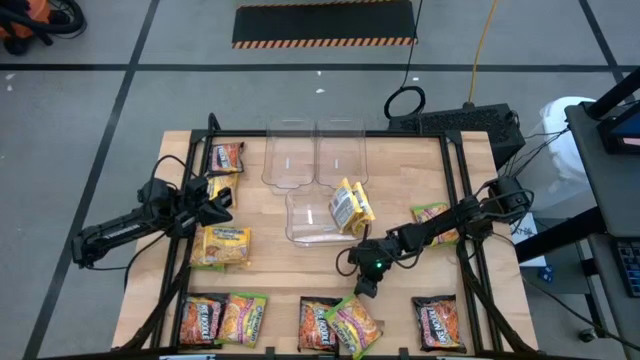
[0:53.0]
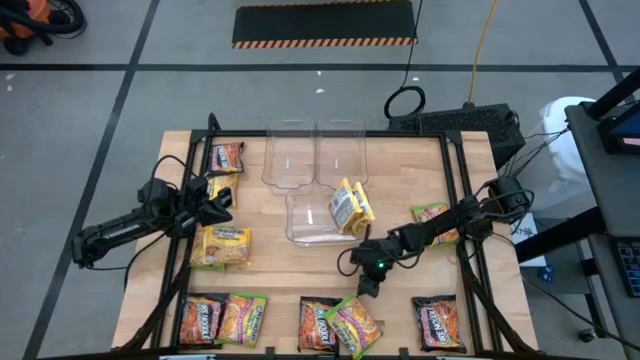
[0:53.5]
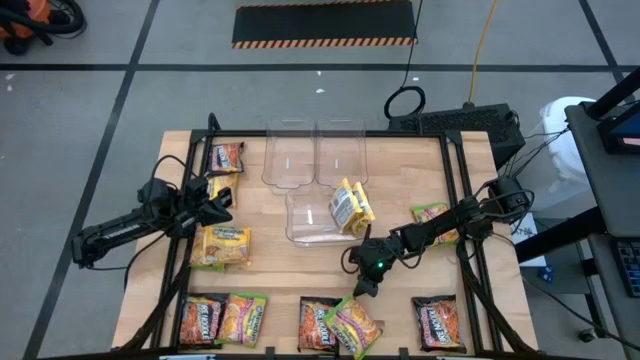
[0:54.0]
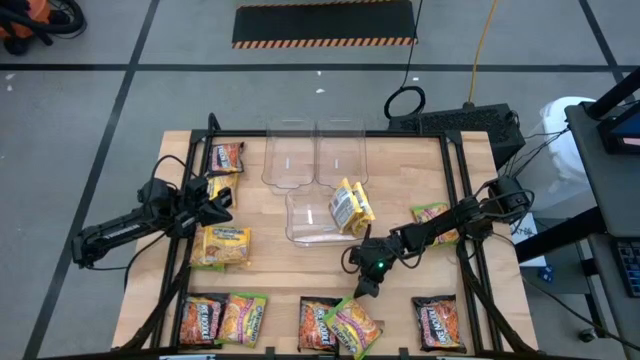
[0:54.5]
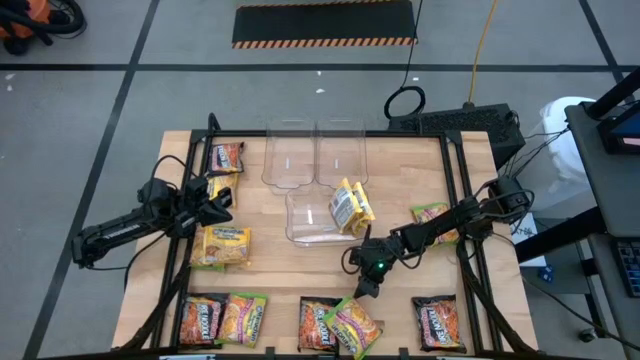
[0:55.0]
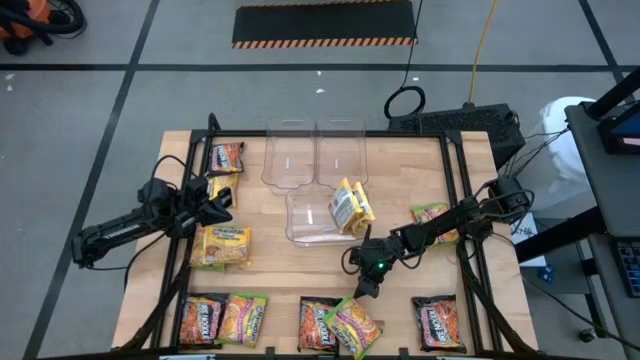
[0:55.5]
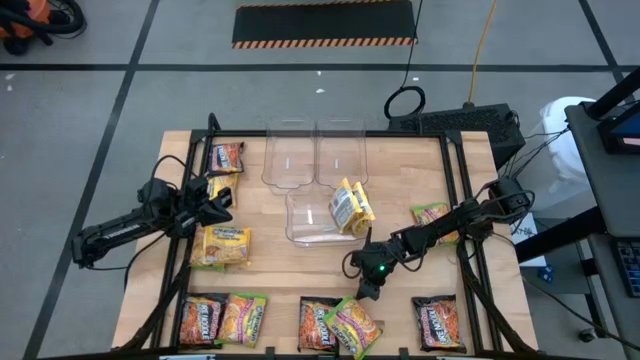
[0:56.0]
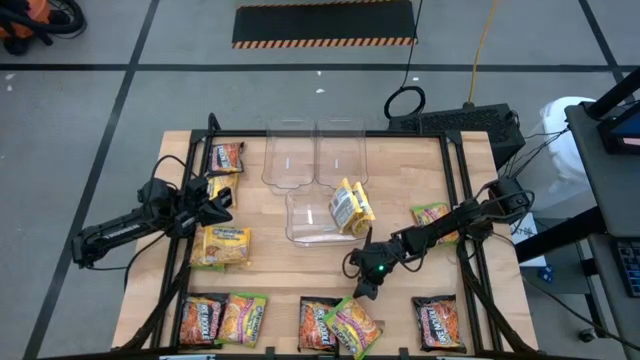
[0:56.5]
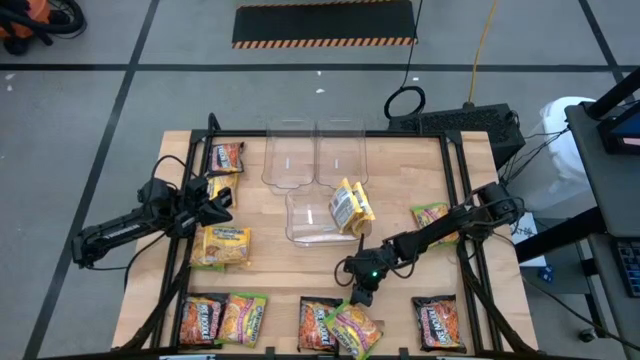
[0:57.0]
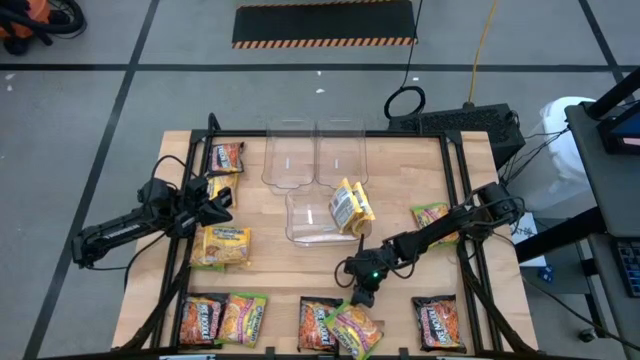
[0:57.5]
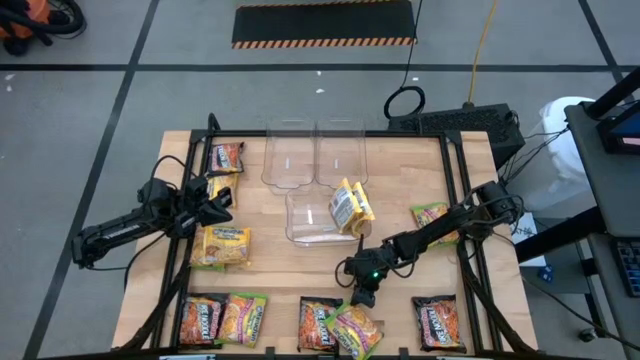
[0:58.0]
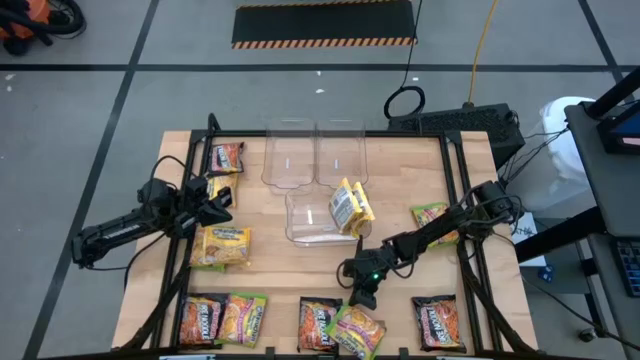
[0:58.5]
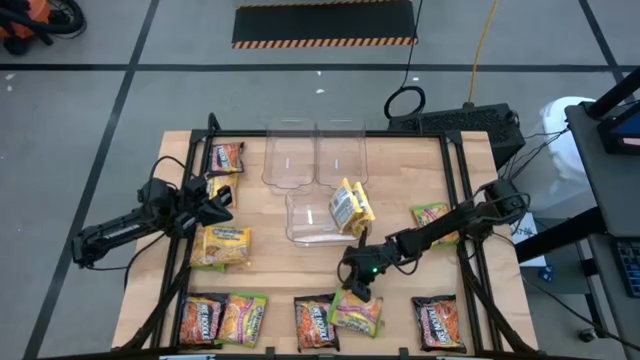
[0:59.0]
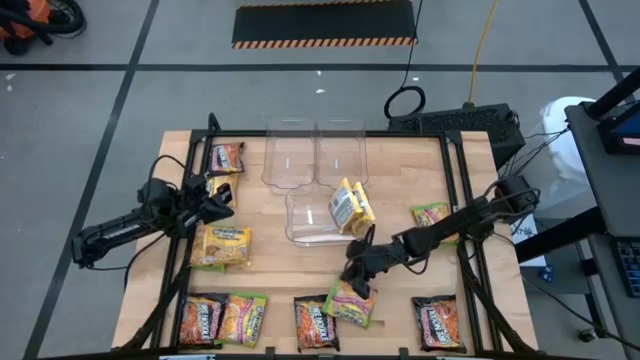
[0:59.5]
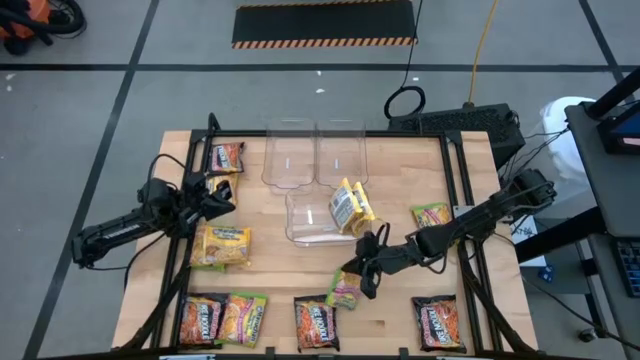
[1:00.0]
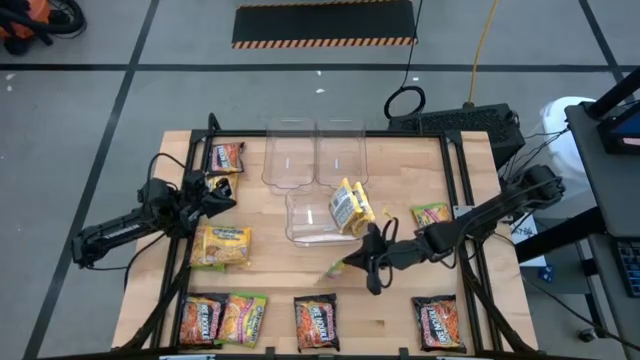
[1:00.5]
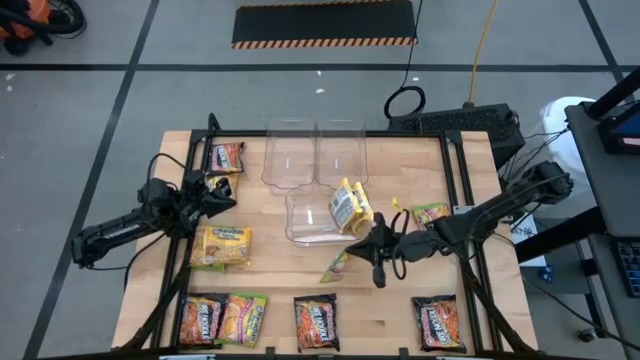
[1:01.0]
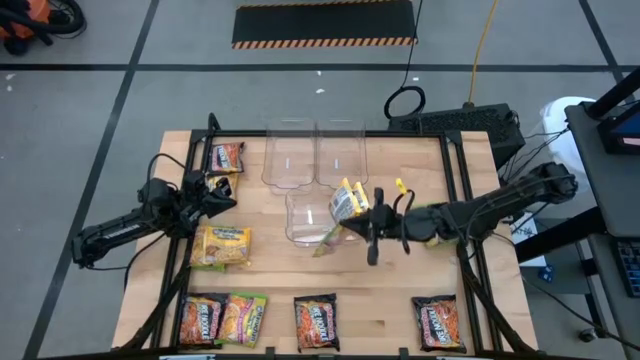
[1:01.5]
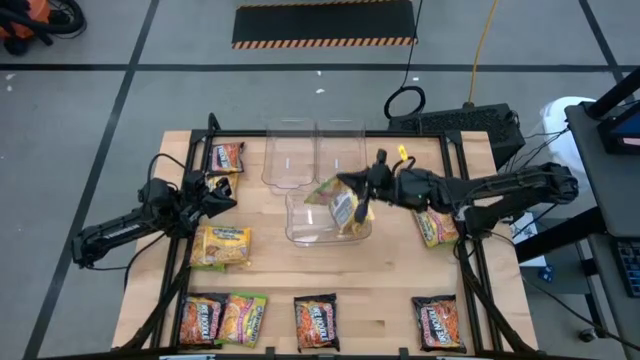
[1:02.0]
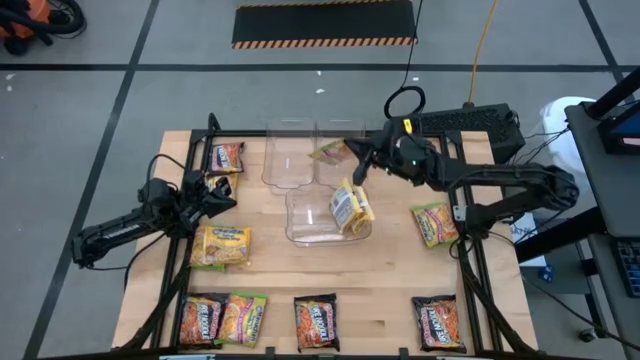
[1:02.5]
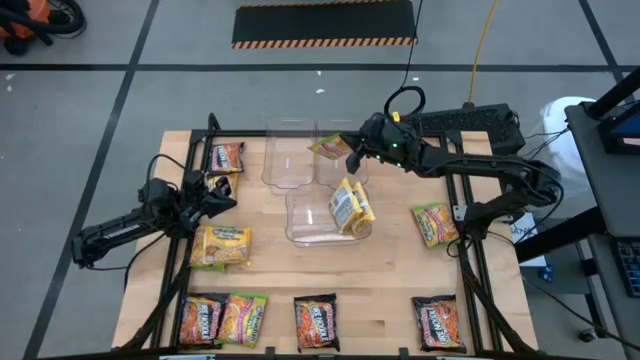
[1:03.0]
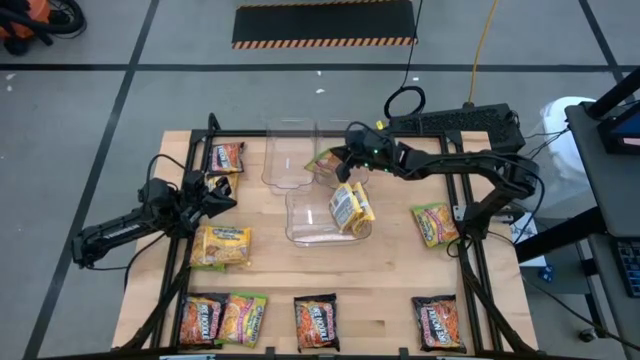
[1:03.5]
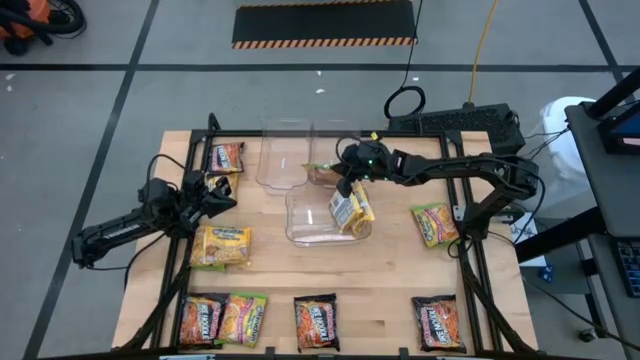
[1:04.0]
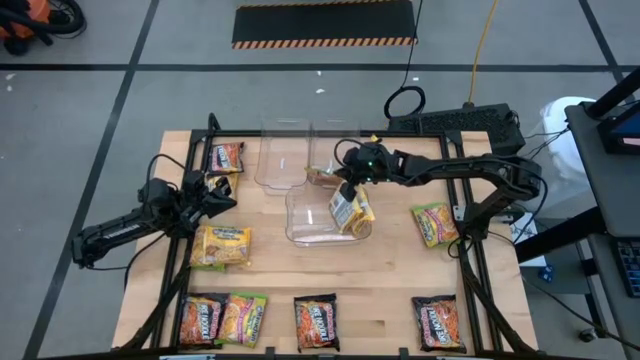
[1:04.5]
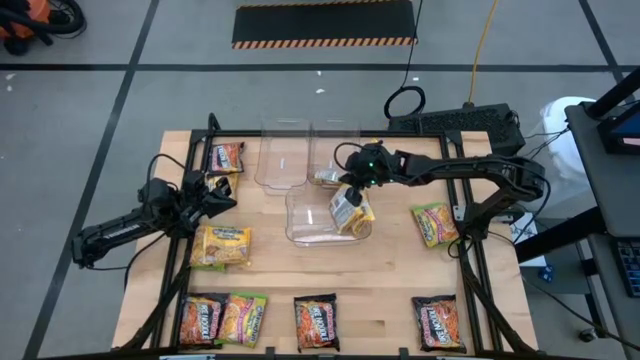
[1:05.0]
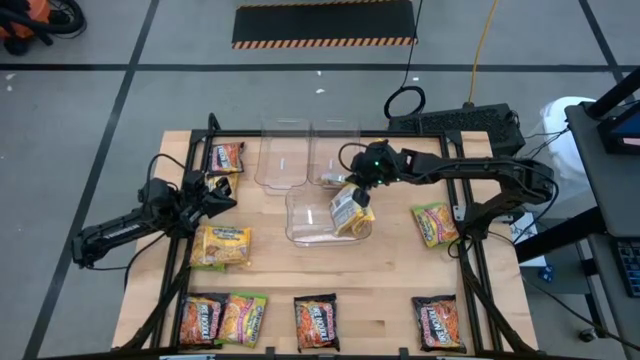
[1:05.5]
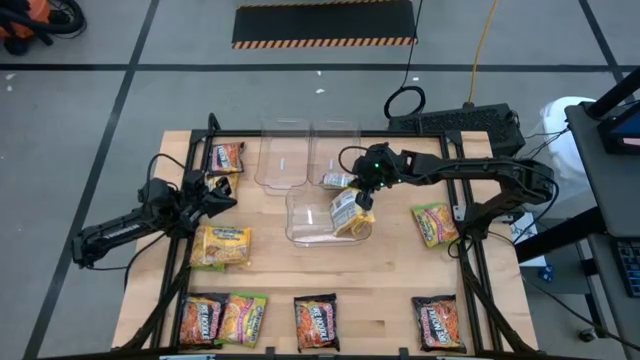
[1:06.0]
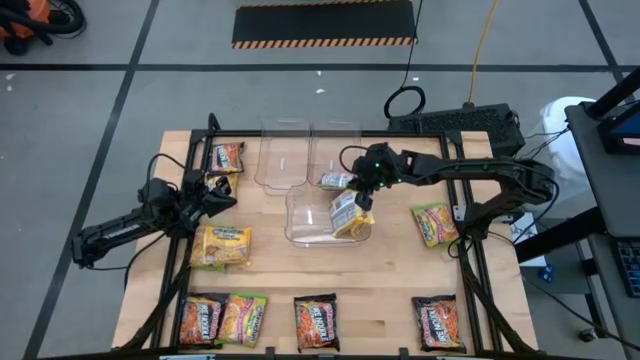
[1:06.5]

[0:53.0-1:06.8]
Task: Sort Maruchan noodles
Put the green noodle pack into the top right transparent bin
